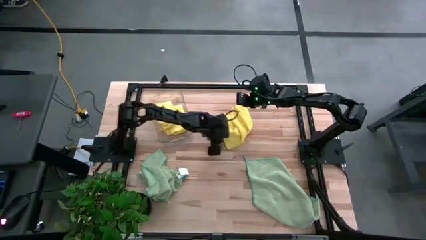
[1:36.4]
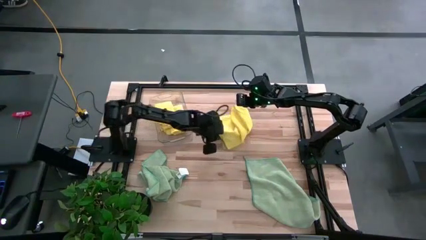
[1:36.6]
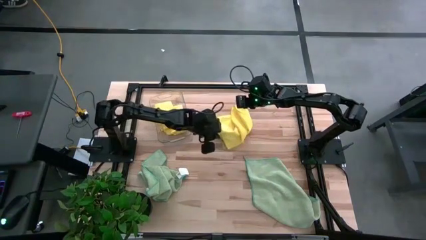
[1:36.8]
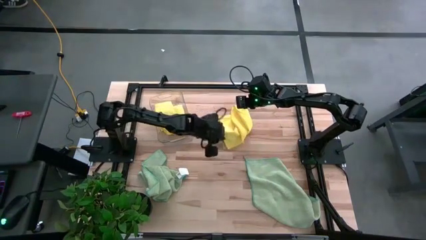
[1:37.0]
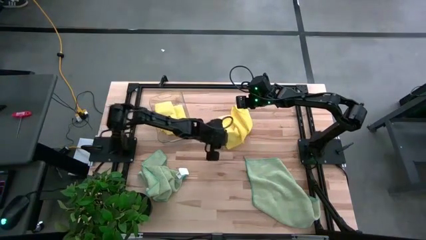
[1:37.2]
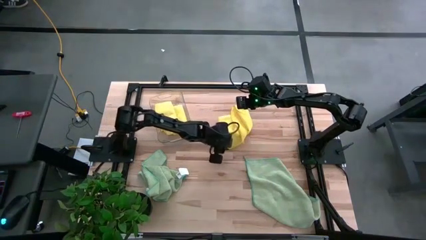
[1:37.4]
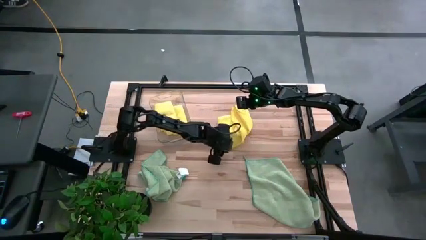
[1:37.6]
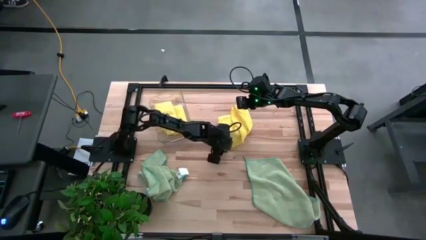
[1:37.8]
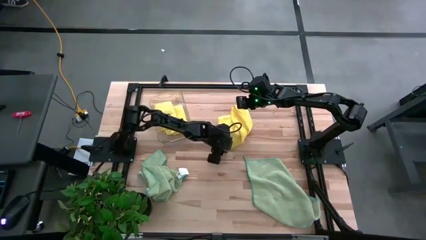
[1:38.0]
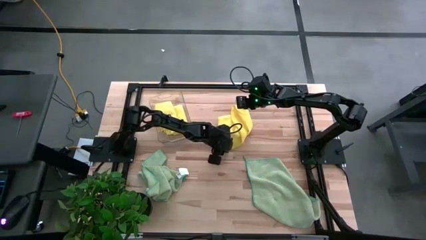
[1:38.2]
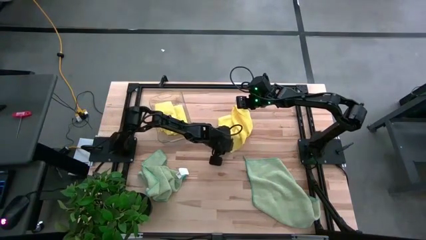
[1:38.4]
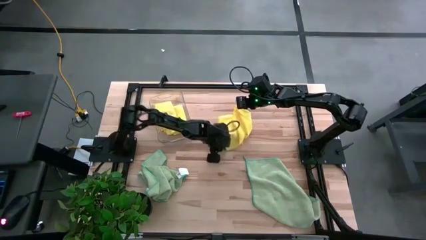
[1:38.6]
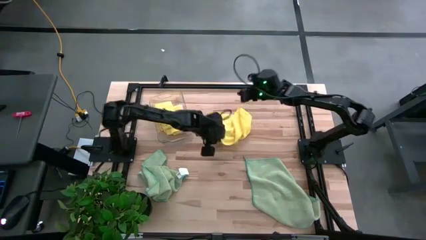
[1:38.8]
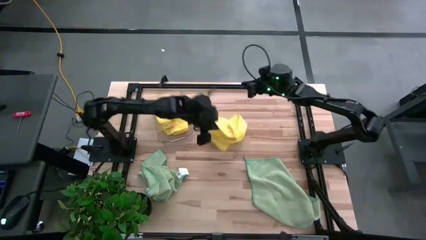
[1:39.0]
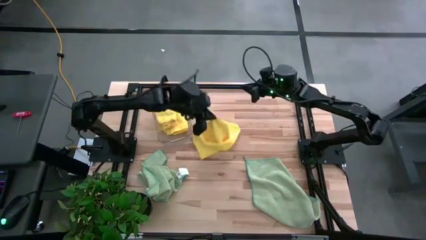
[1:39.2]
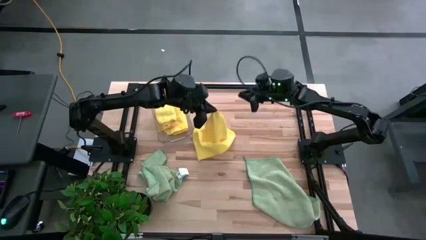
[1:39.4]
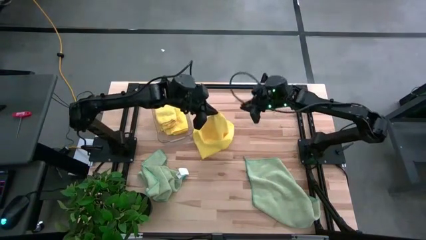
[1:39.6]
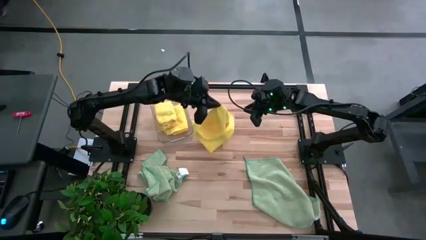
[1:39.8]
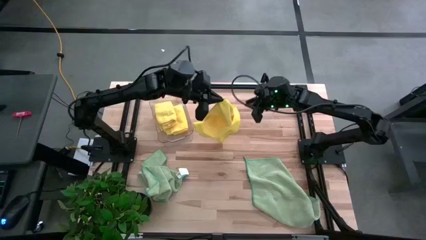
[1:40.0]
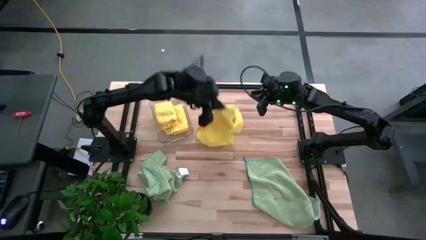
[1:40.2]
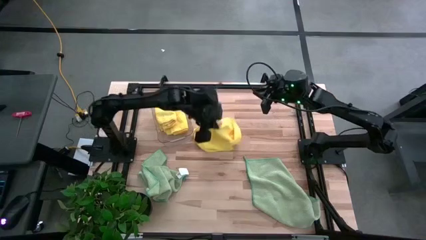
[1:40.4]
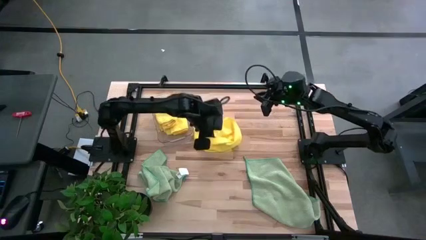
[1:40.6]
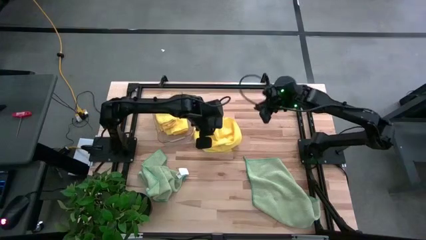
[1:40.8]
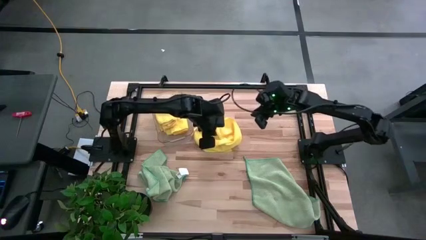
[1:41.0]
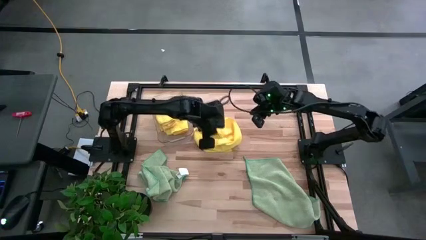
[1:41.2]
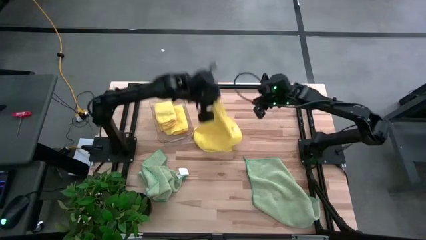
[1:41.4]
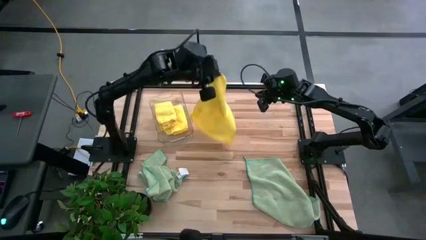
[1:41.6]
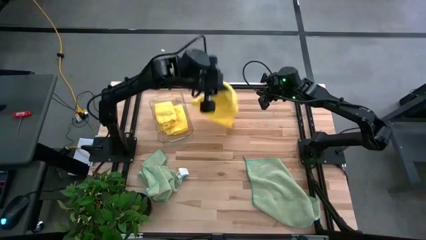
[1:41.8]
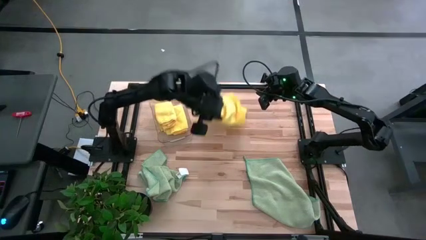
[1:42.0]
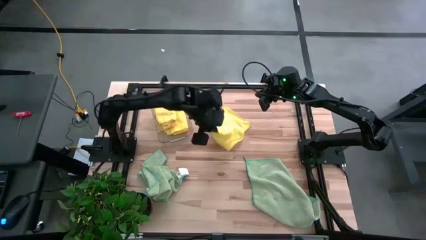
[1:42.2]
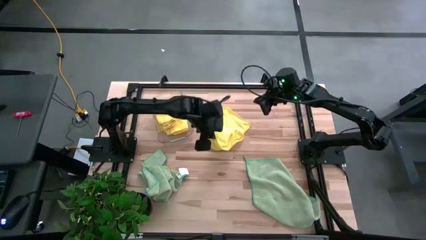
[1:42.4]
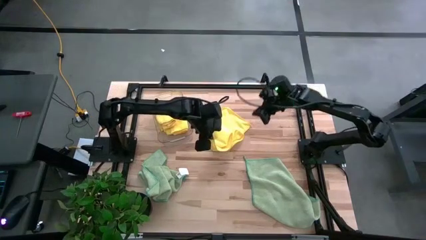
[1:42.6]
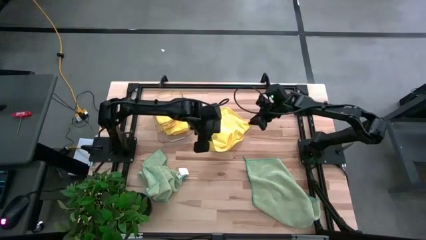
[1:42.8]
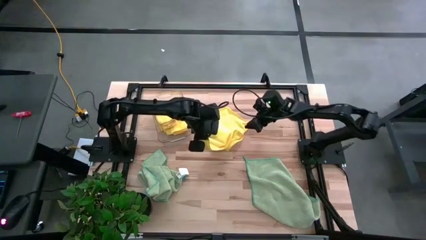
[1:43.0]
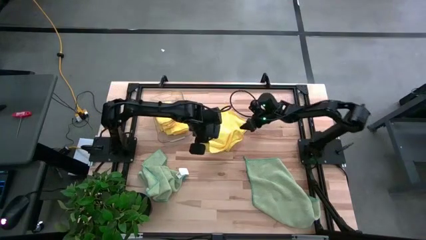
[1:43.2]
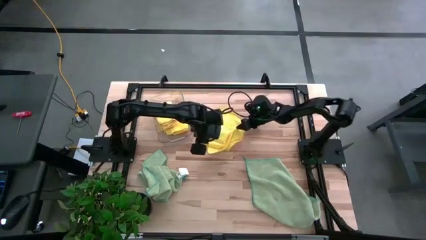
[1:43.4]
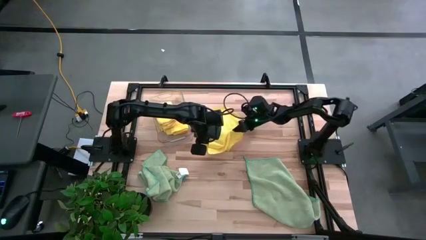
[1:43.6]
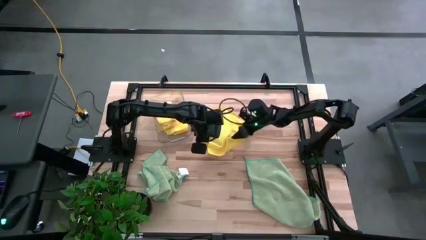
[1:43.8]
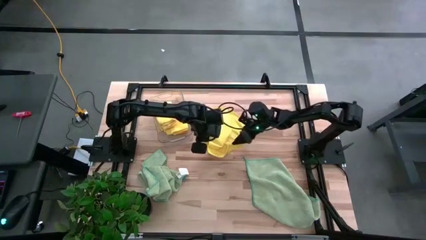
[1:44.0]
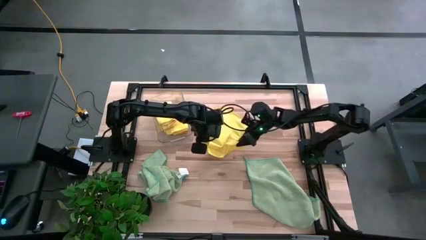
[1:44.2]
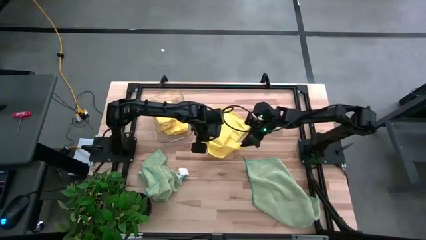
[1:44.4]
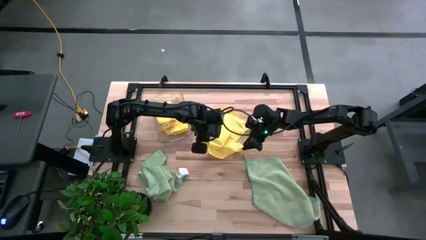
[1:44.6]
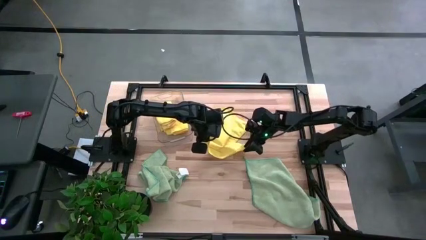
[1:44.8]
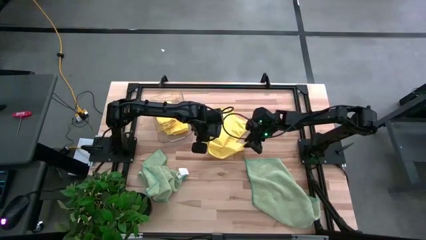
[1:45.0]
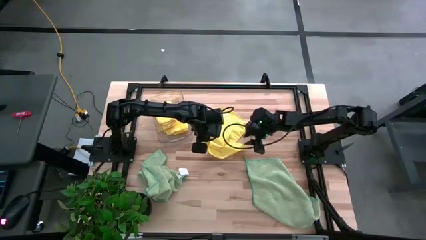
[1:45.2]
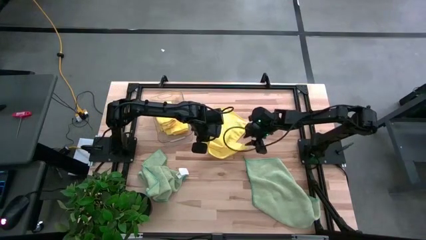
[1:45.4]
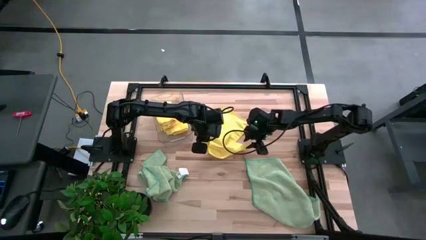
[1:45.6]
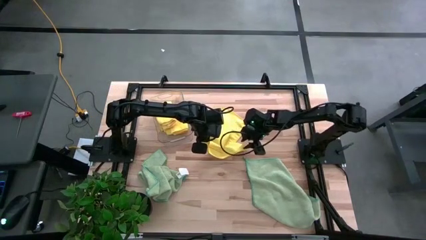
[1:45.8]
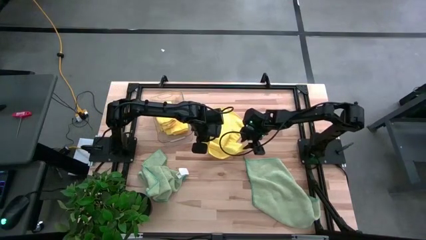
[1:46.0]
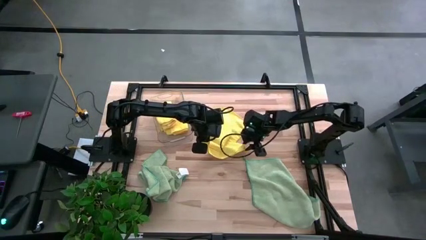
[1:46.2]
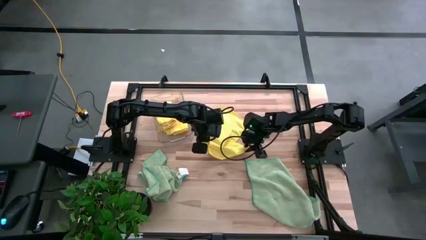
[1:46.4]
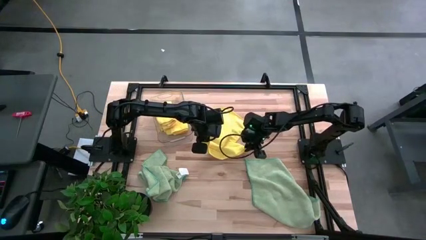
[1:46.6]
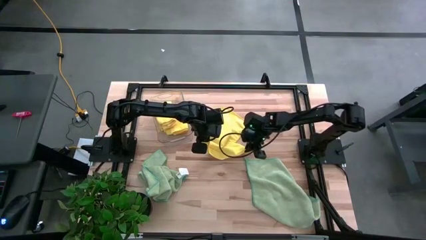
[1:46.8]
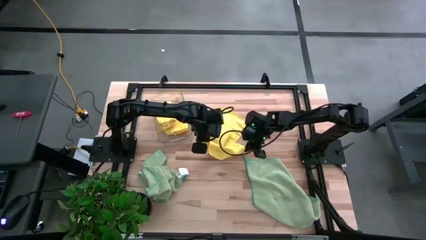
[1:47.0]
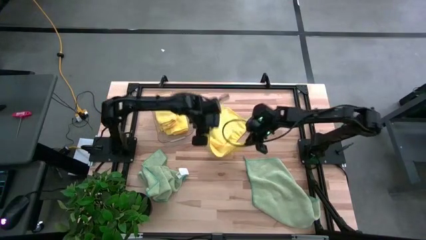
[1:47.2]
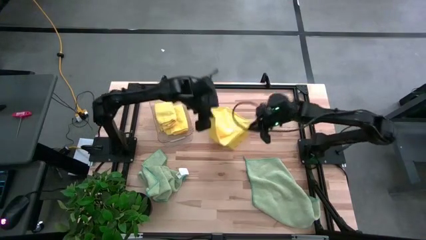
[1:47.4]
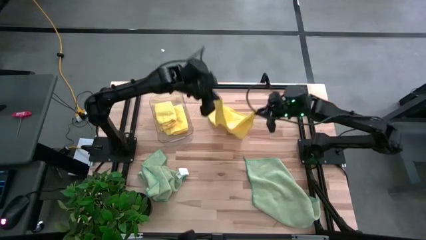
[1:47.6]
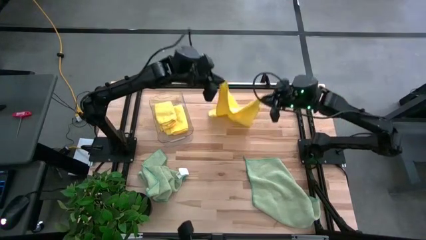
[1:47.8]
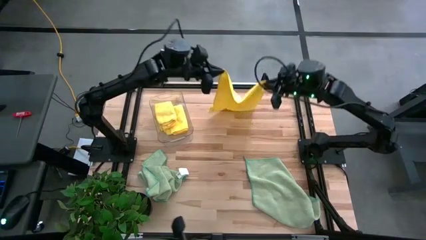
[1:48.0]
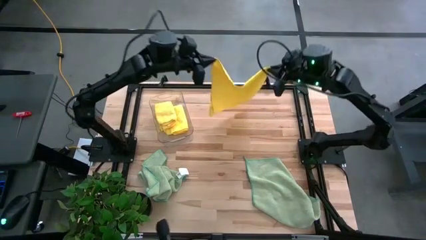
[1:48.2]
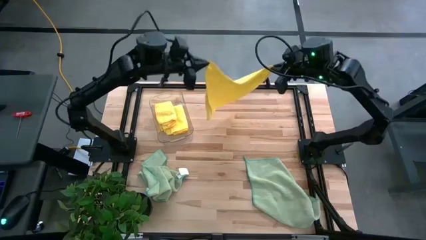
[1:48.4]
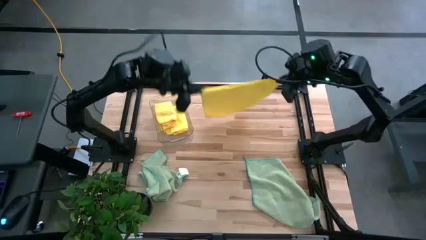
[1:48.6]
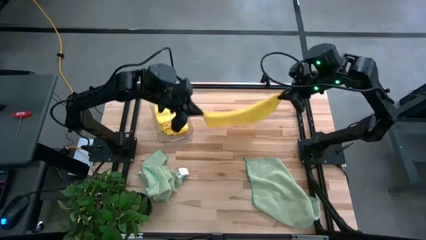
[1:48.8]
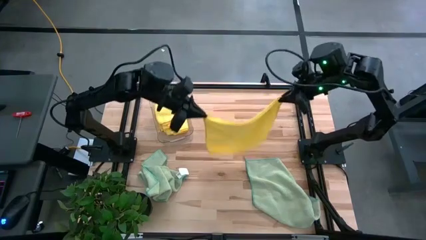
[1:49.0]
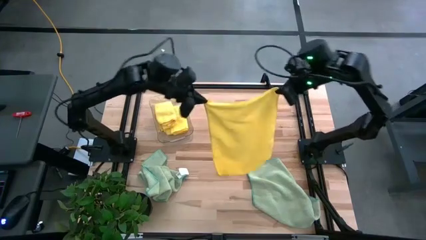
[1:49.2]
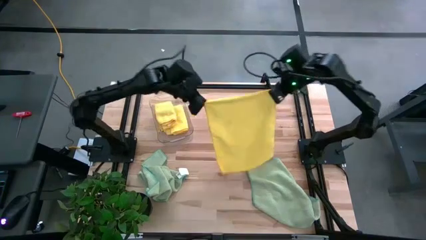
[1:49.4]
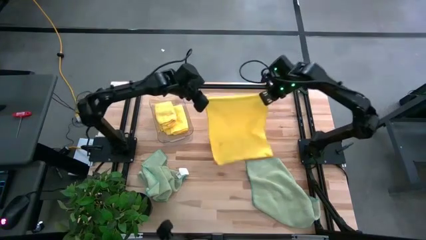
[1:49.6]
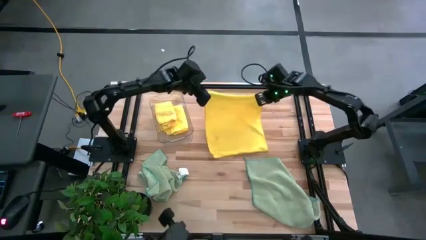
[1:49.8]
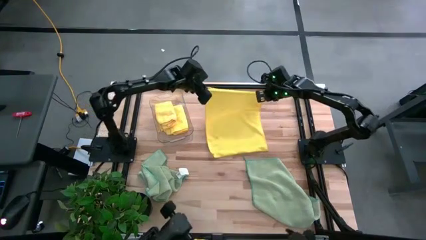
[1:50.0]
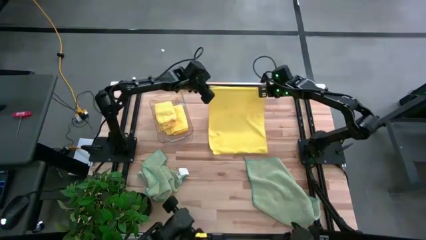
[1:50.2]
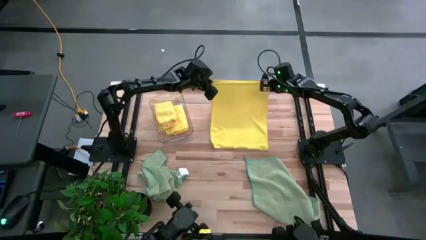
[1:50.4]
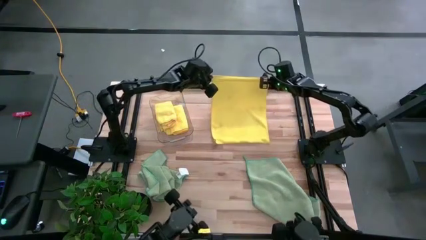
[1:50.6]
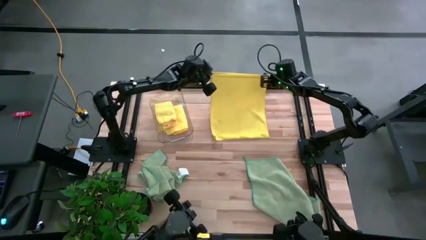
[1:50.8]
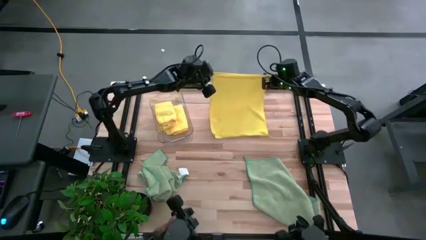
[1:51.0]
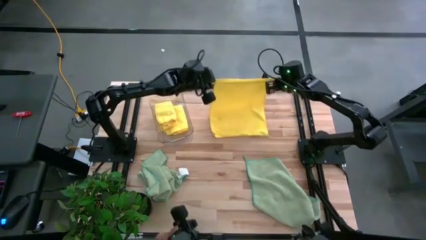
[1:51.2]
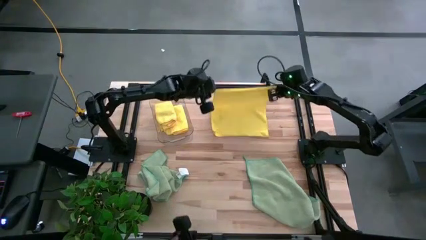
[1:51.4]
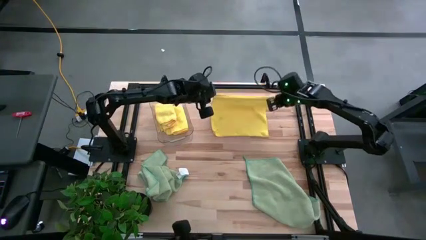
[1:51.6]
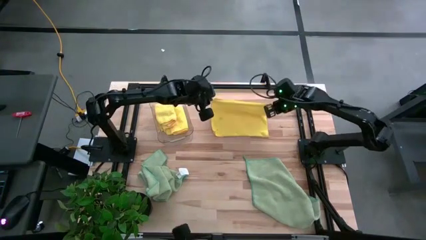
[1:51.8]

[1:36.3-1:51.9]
Task: Fold microfiber towels
Fold the yellow towel
